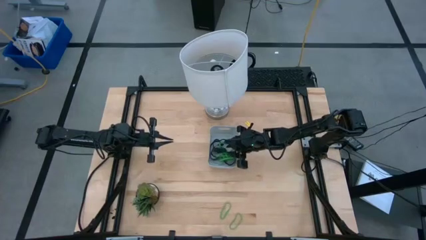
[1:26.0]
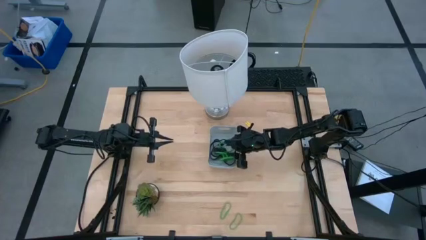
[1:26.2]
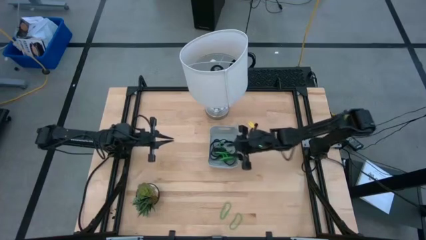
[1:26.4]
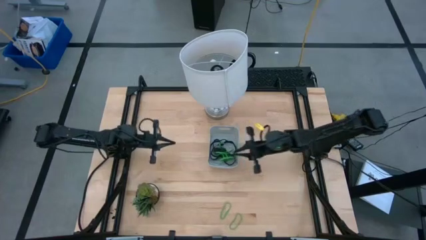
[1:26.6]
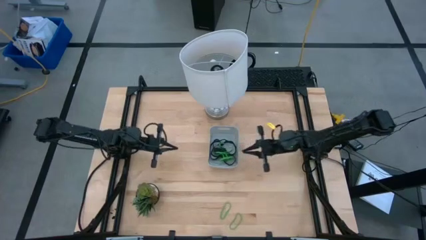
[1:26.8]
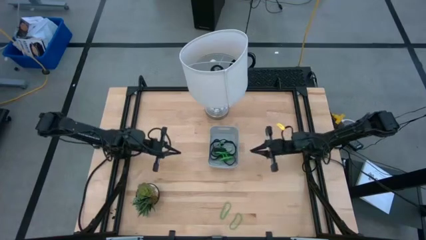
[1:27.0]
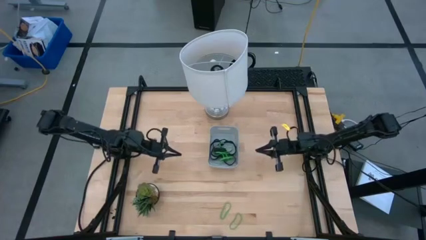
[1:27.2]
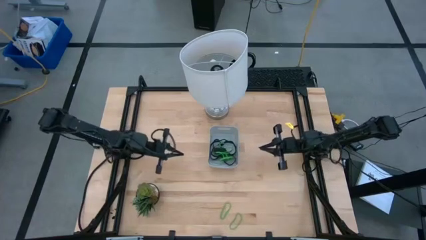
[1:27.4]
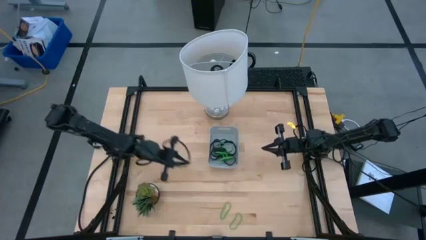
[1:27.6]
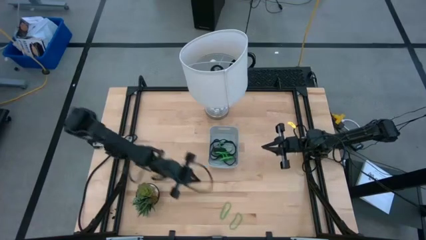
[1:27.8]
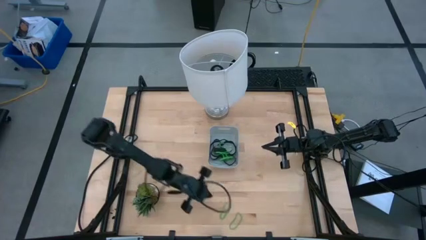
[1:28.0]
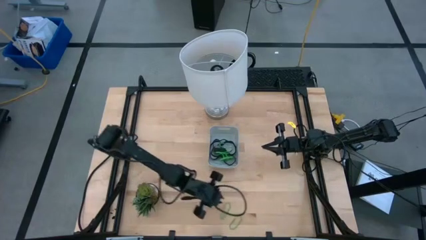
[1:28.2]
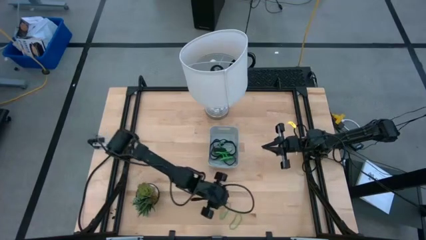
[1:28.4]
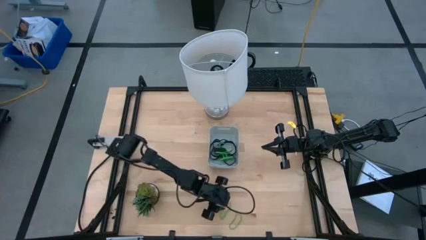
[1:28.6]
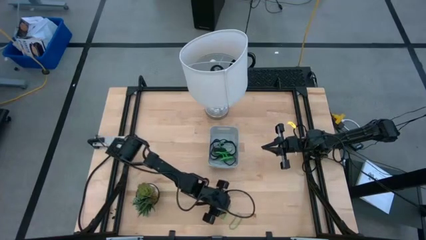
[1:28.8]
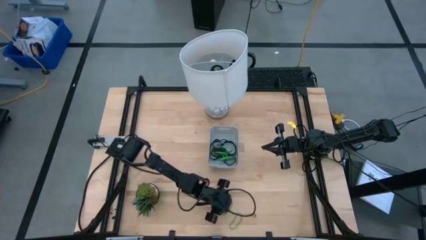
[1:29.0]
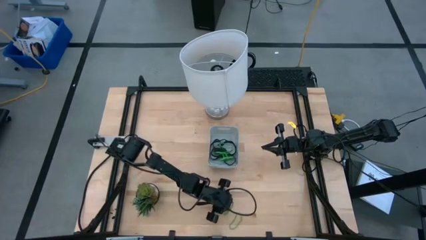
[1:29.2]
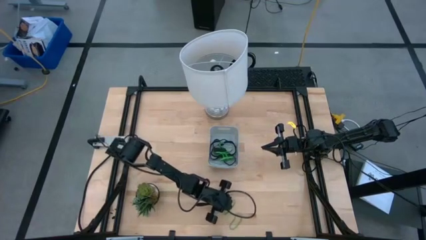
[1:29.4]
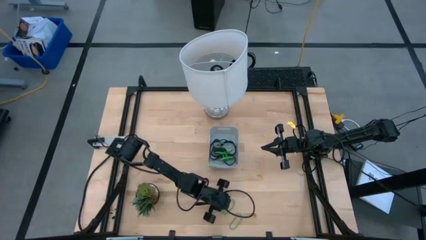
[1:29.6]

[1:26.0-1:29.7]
Task: Pick and place rubber bands into bin
Put the green rubber band into the gray bin

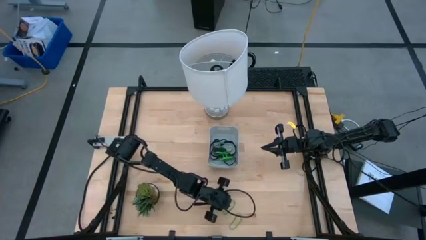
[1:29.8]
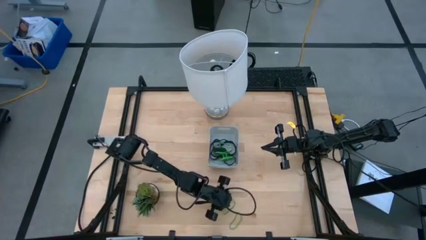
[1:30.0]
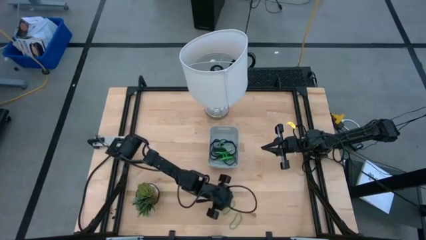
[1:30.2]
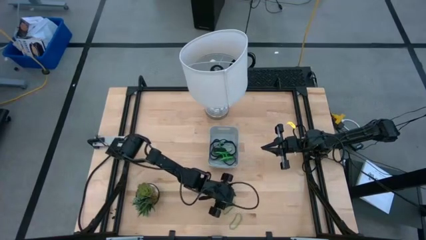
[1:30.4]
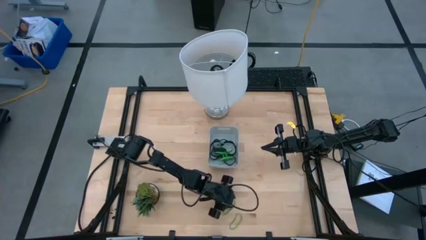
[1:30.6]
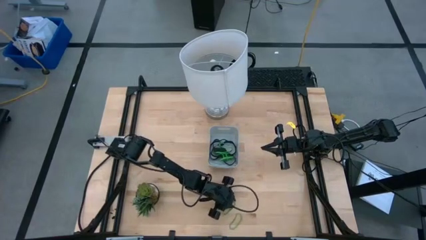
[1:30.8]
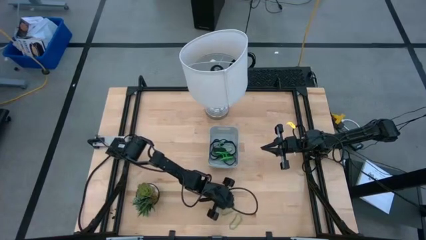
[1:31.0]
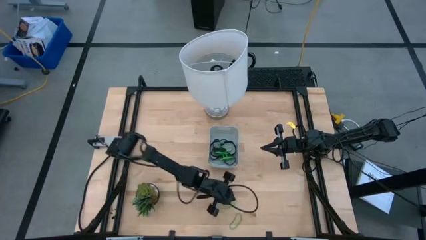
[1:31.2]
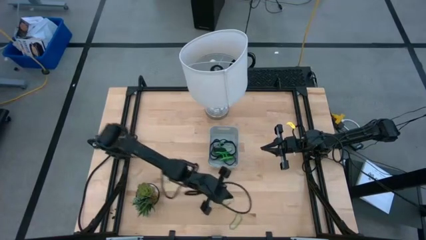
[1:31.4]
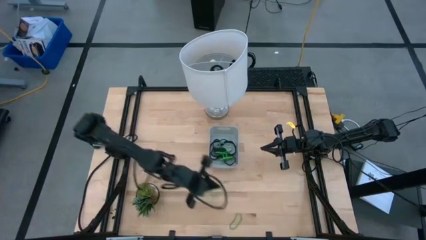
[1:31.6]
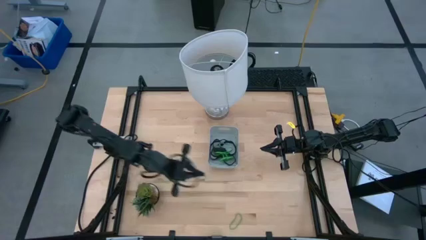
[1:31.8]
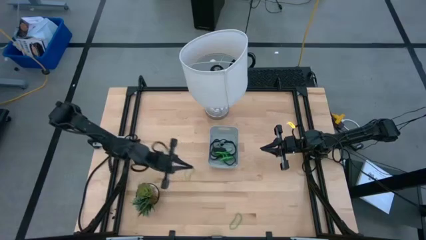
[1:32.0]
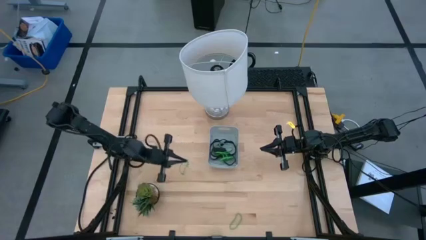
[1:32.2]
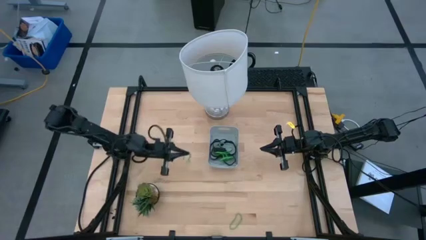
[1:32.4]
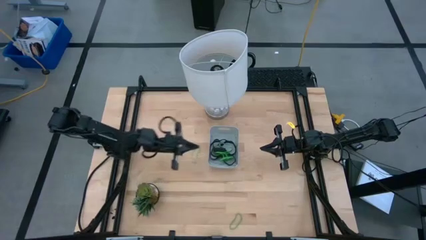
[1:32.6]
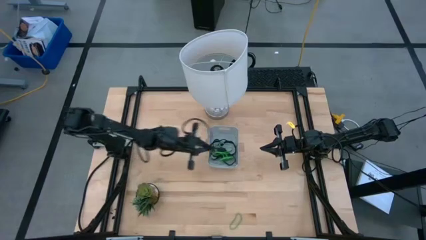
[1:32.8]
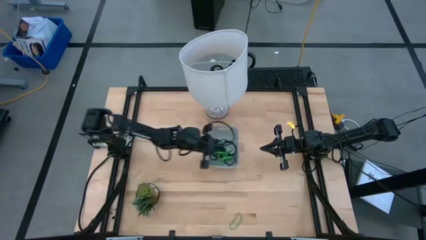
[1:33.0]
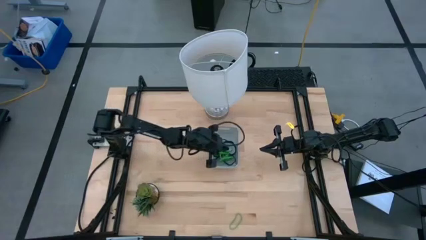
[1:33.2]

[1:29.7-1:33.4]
Put the green rubber band into the gray bin

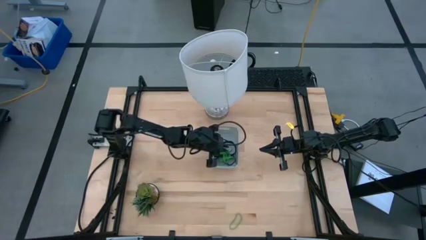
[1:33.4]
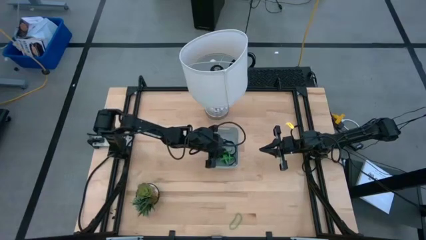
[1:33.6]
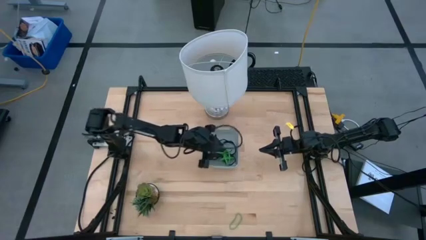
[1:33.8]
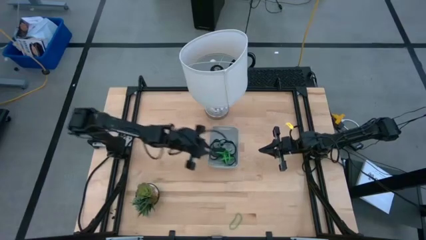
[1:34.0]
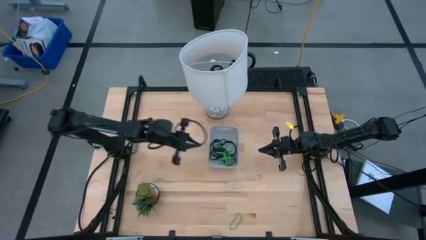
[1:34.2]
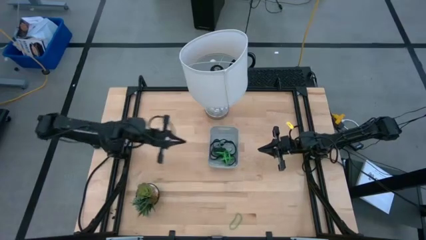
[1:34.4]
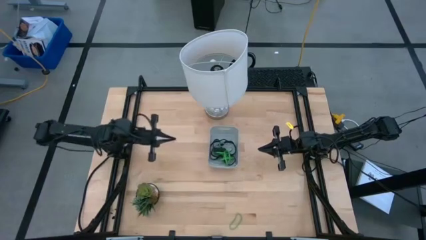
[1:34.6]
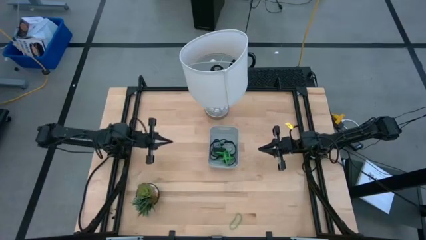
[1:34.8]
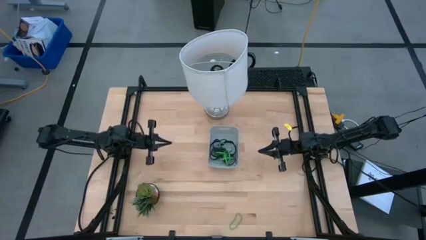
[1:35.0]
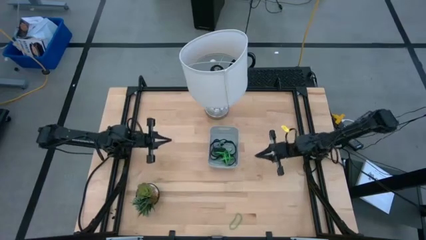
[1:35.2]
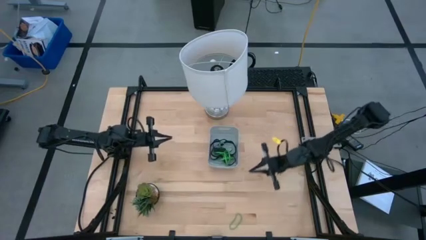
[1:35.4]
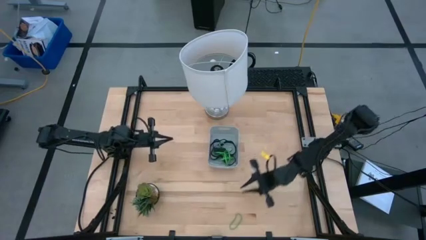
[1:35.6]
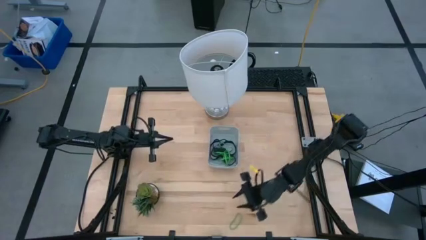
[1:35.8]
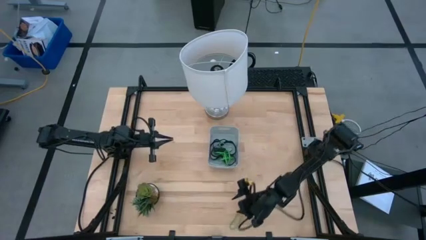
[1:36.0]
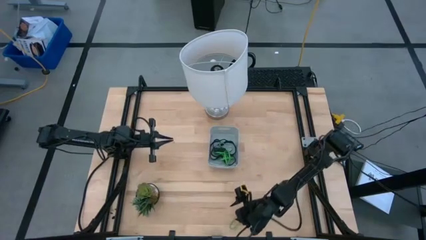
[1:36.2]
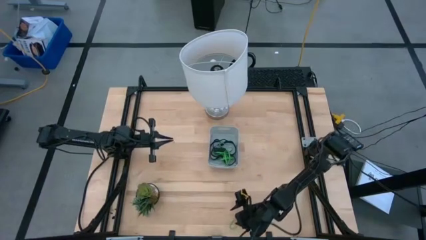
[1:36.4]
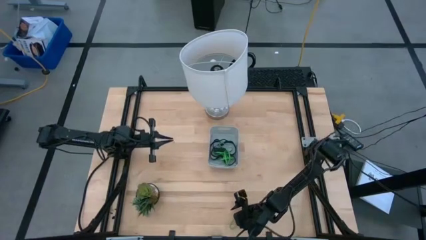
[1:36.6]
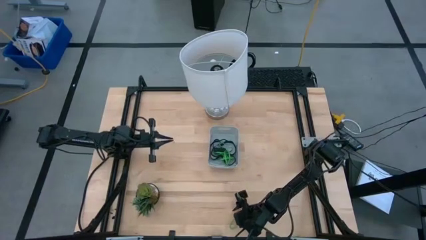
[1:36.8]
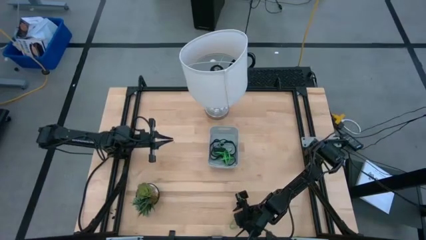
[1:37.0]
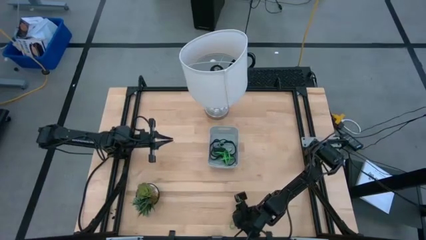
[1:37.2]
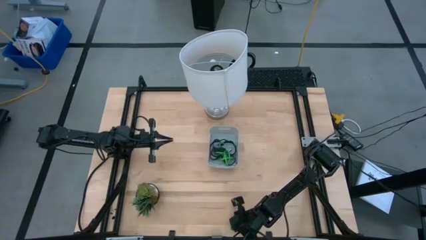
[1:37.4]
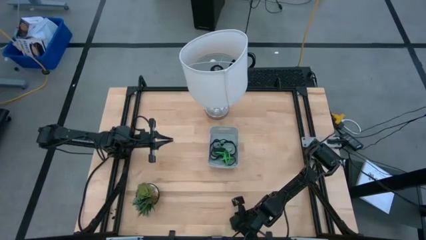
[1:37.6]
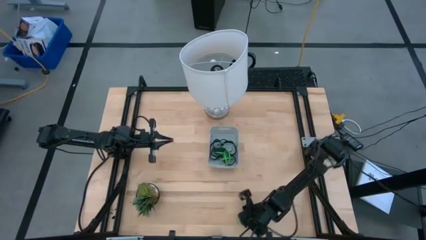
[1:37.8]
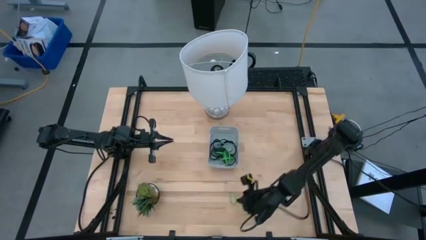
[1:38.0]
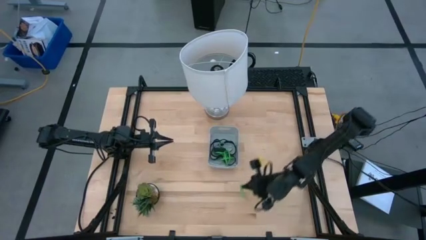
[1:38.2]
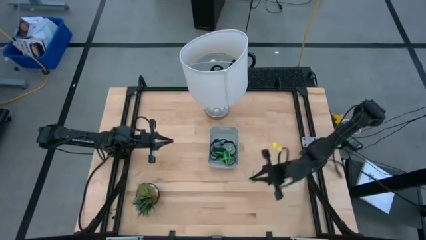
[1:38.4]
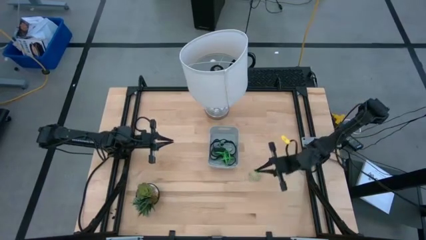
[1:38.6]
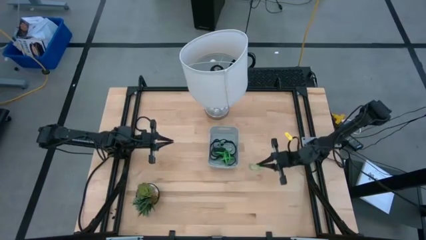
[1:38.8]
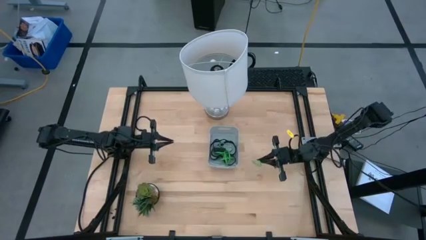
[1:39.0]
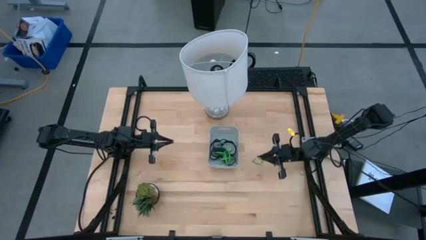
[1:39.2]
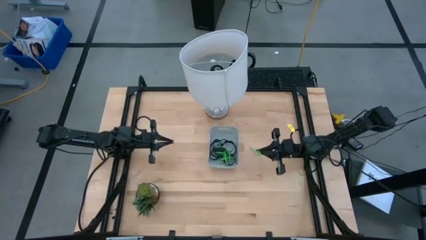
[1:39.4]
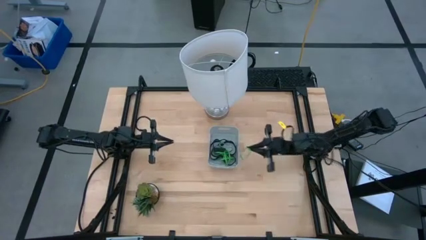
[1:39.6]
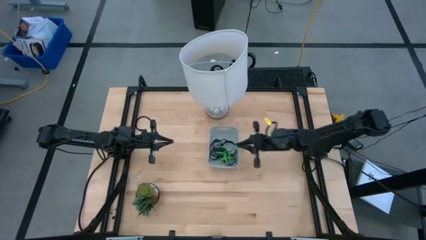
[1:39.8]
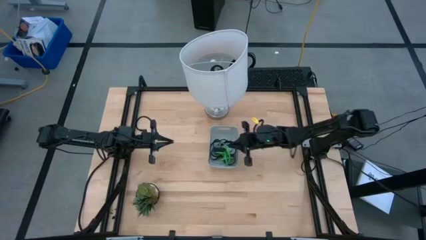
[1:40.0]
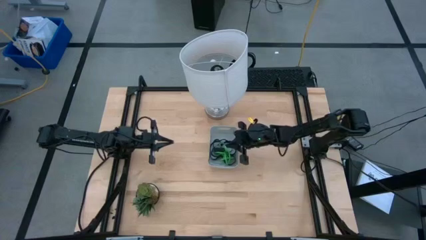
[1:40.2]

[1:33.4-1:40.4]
Put the green rubber band into the gray bin

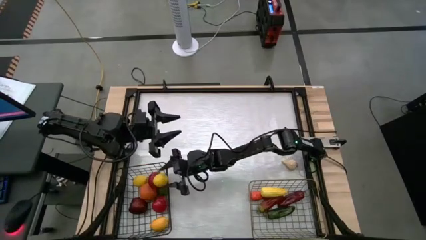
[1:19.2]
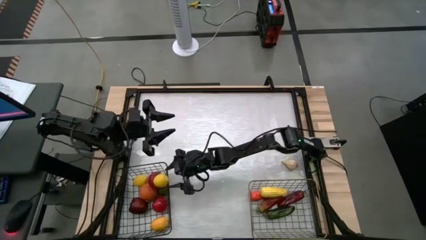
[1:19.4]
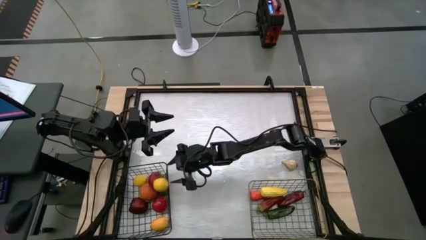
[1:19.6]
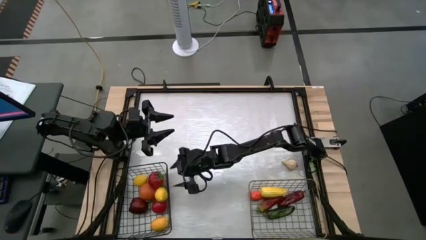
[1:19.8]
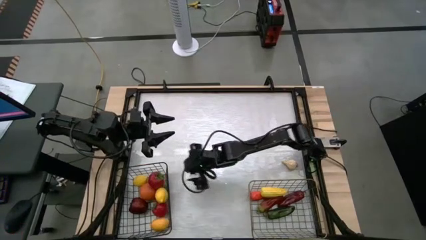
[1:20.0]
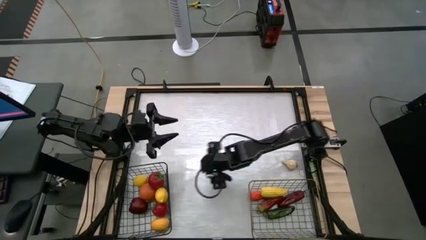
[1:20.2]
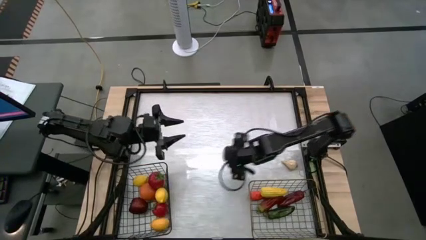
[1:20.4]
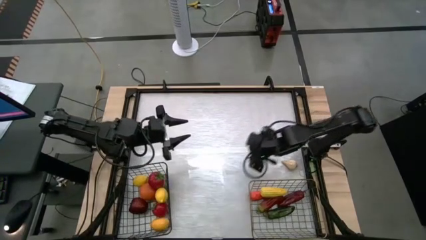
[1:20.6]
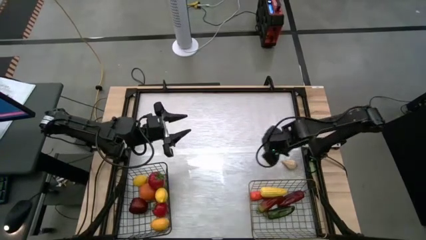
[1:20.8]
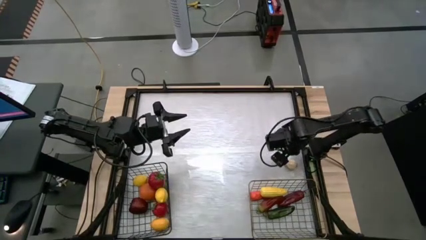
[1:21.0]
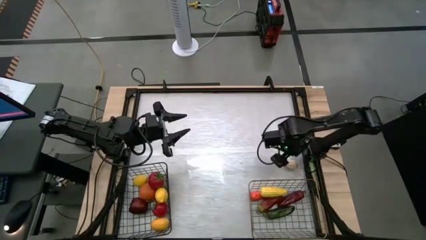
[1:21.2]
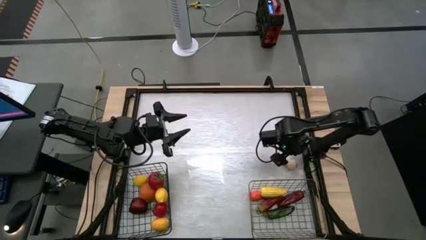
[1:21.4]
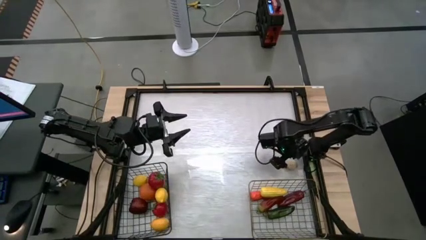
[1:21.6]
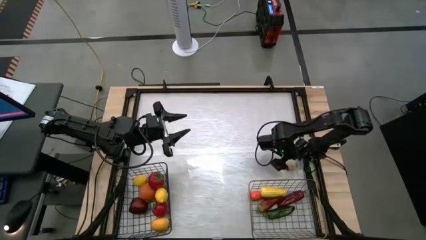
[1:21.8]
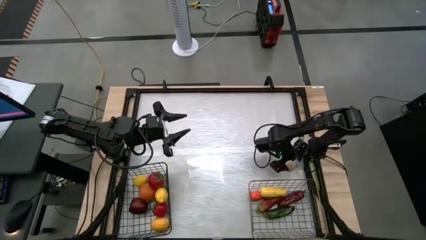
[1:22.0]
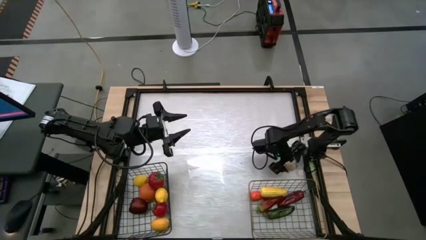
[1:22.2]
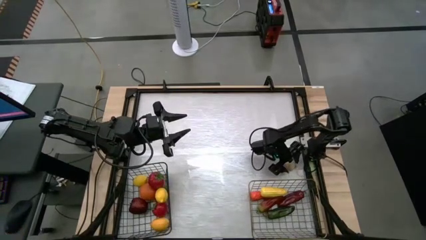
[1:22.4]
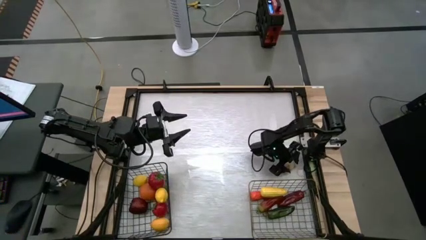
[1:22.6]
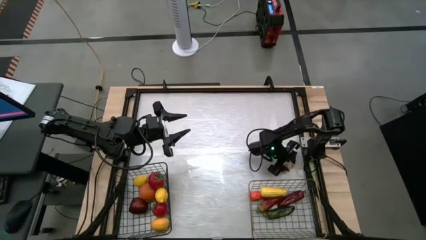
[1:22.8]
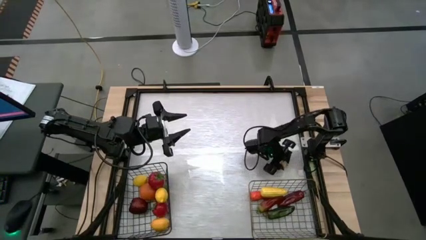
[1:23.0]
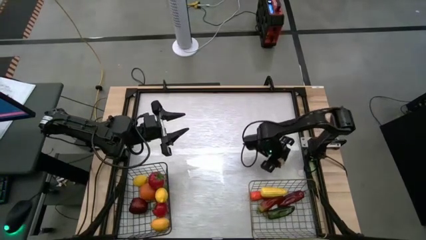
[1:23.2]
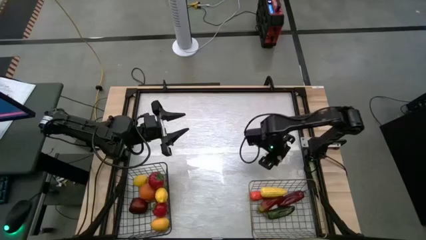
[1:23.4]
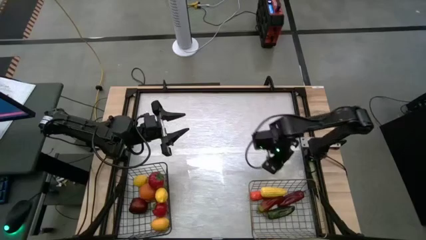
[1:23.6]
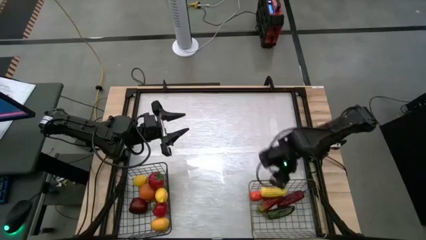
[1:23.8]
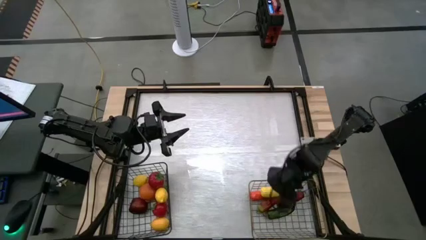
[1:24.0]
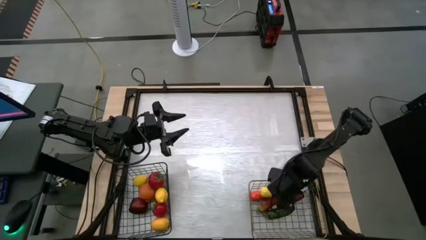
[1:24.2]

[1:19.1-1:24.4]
Task: Sort produce into baskets
Put the garlic into the gold wire basket
